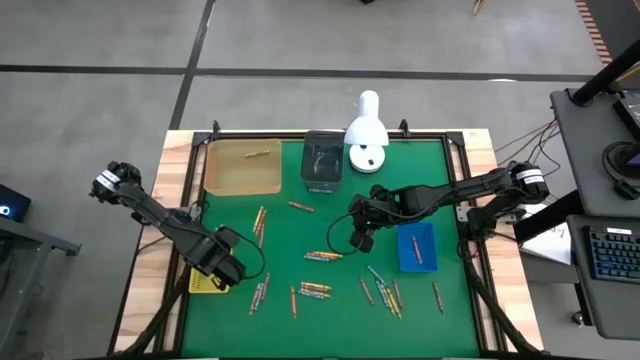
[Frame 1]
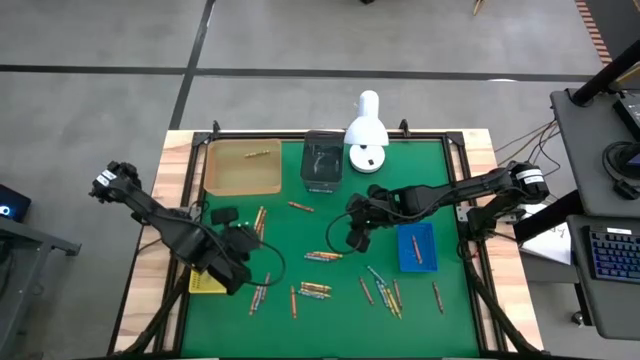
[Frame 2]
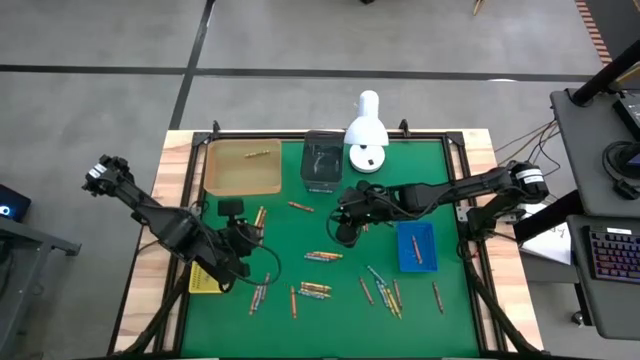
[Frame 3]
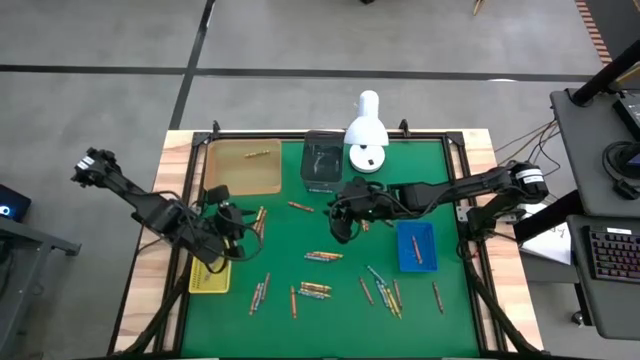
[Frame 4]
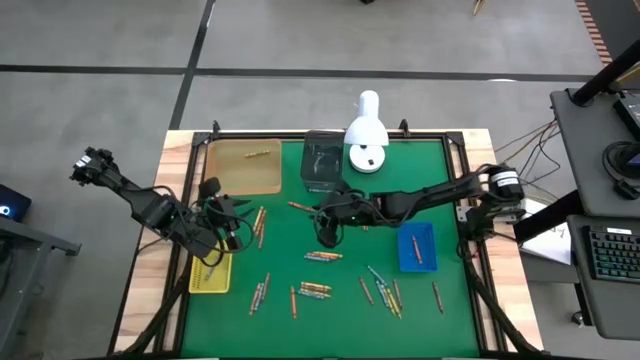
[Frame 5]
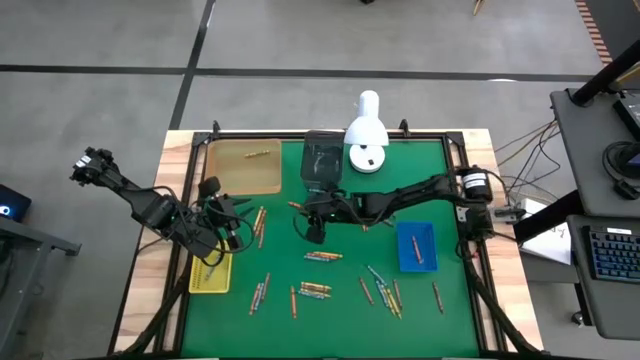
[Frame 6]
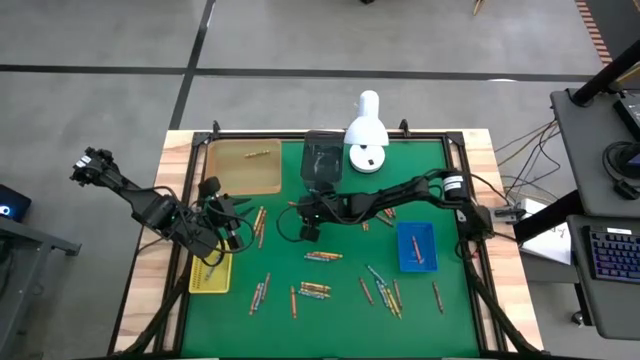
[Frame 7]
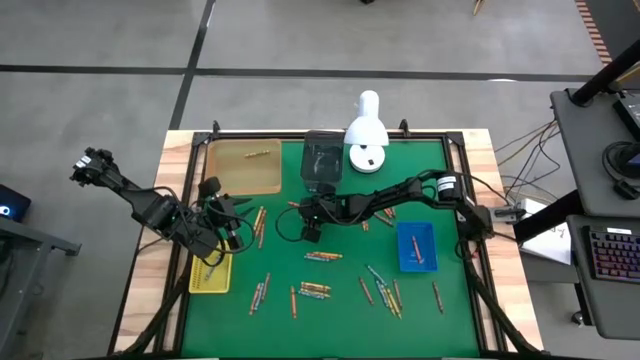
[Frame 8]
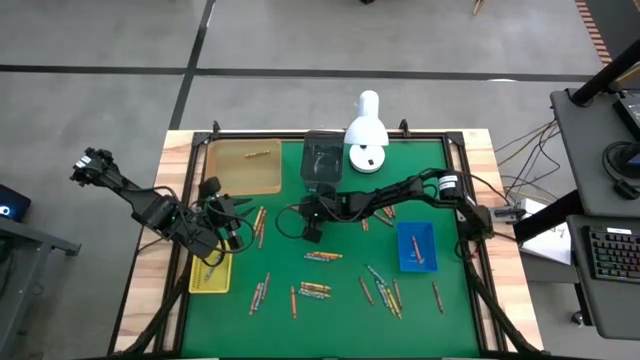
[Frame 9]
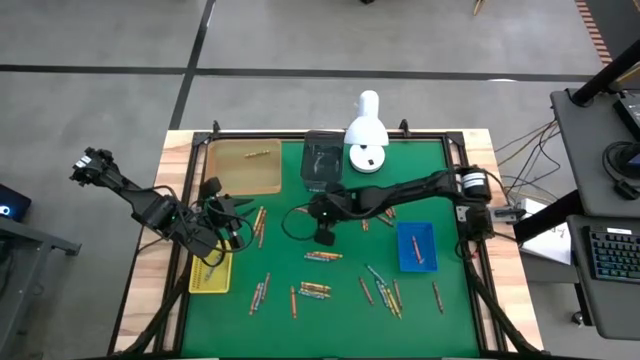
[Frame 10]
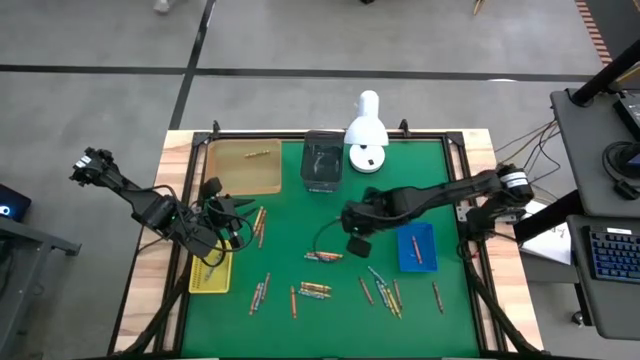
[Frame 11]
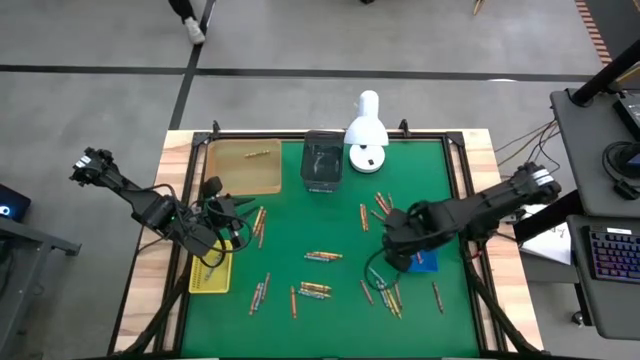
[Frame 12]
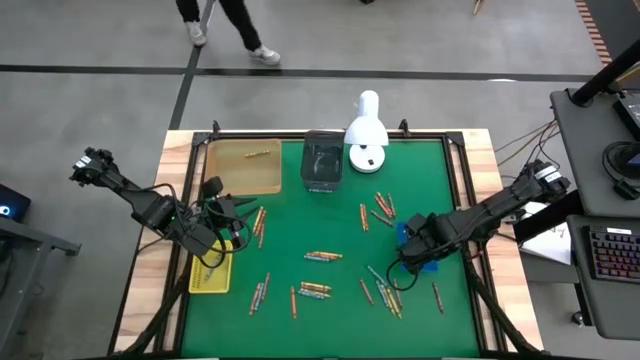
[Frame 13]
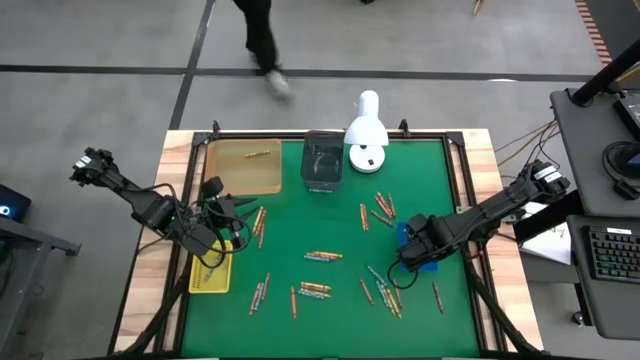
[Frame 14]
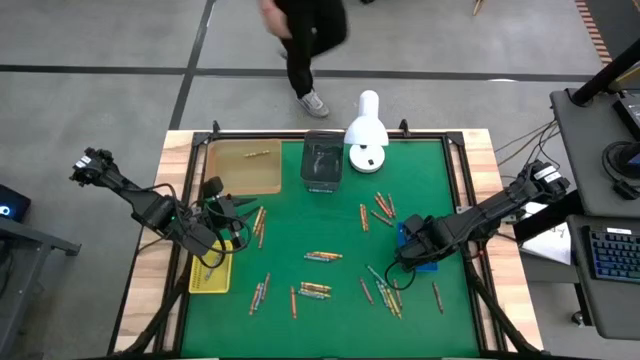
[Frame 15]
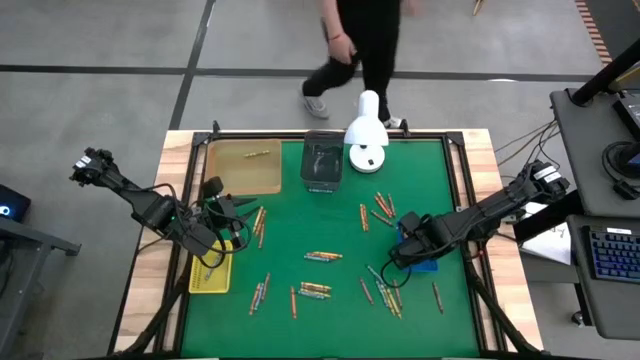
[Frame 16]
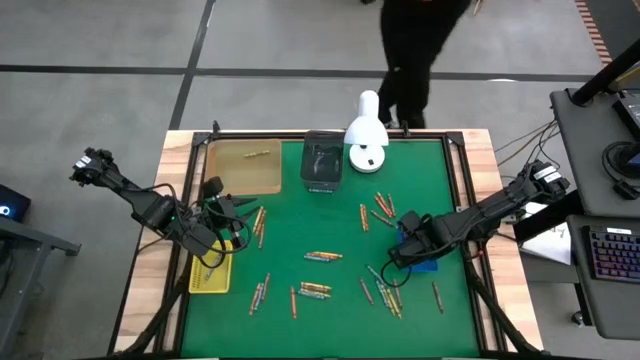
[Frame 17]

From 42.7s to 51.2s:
Task: Sort crayons
Put the orange crayon into the blue bin

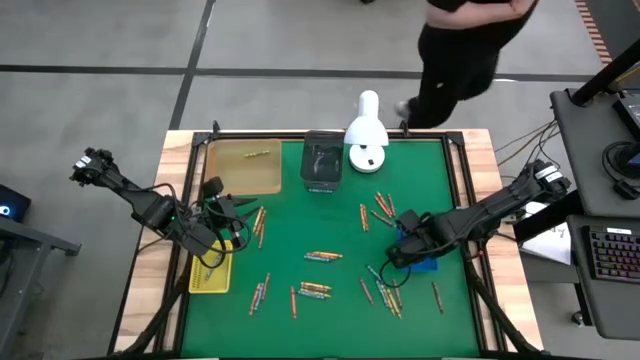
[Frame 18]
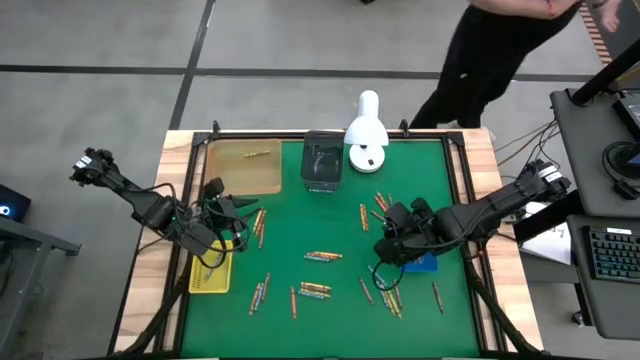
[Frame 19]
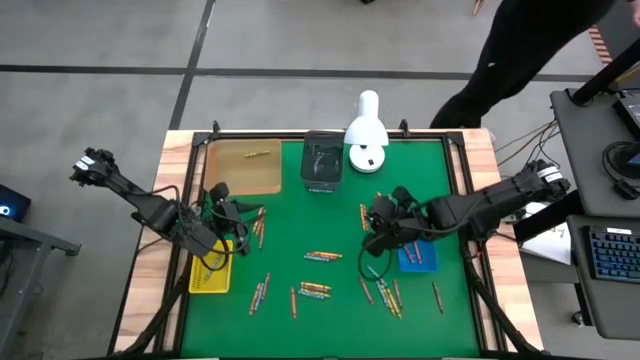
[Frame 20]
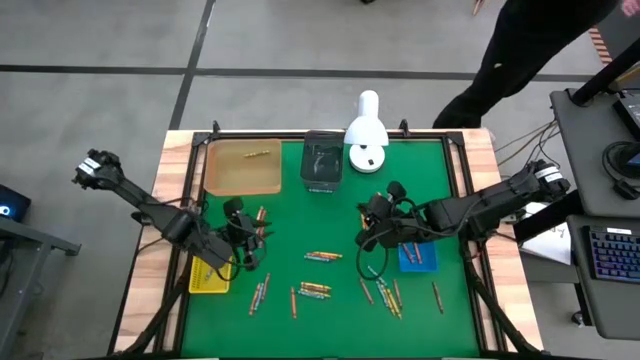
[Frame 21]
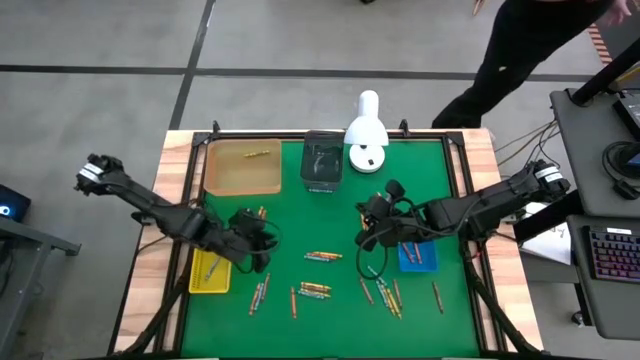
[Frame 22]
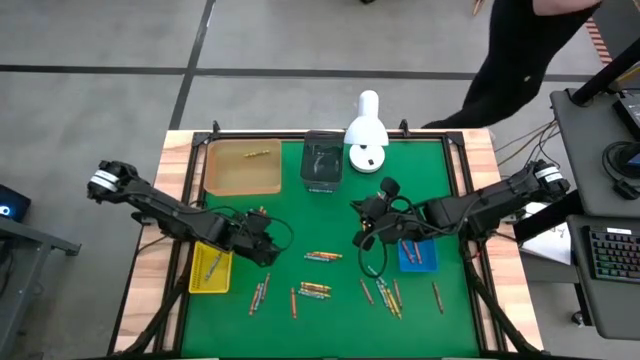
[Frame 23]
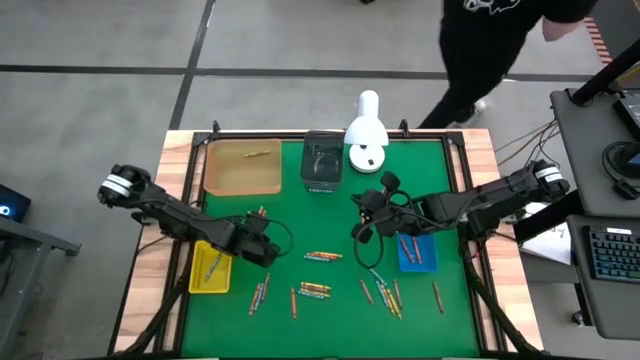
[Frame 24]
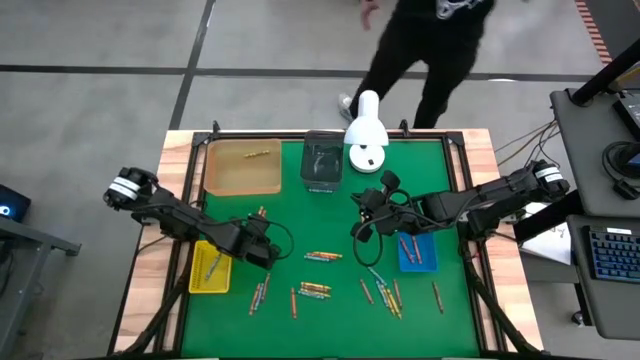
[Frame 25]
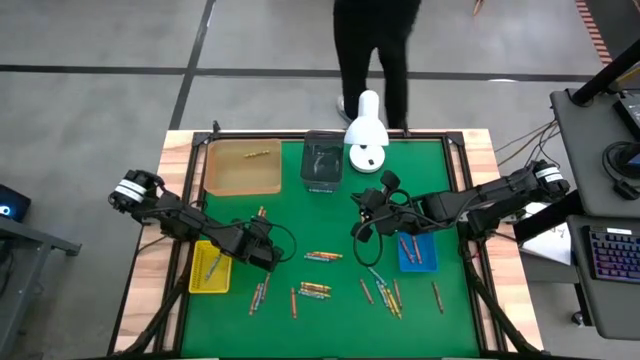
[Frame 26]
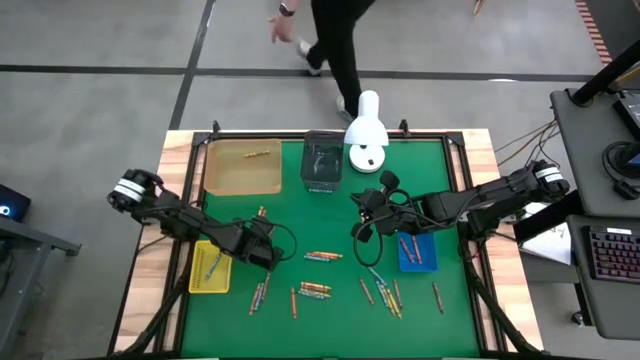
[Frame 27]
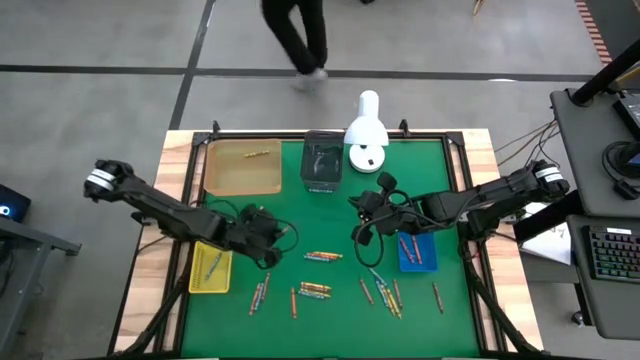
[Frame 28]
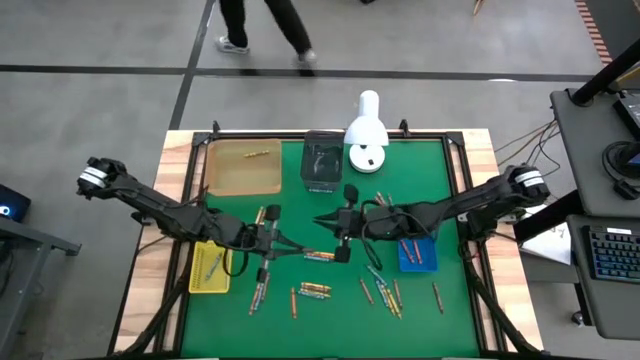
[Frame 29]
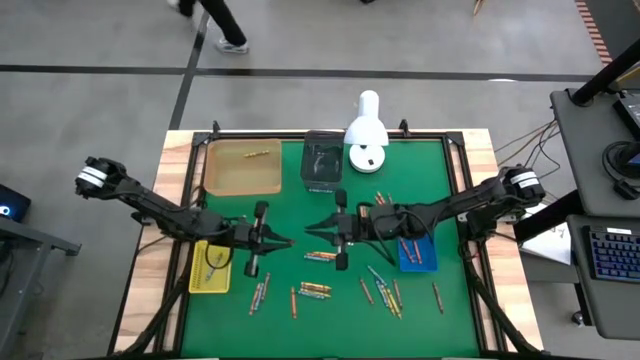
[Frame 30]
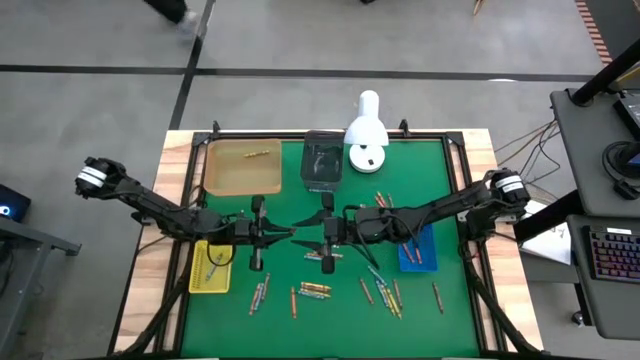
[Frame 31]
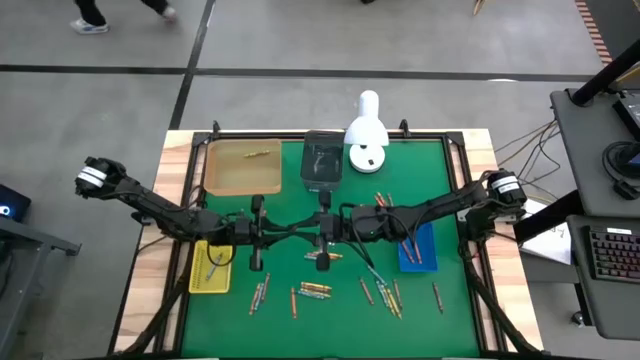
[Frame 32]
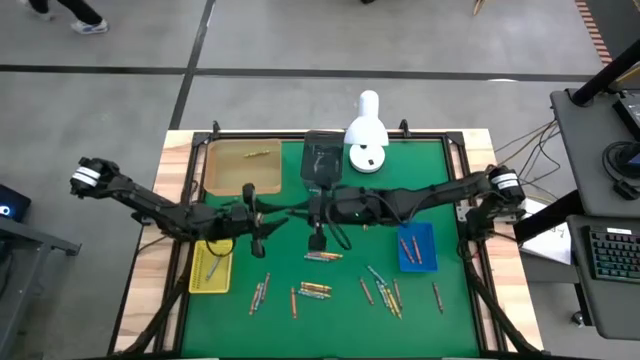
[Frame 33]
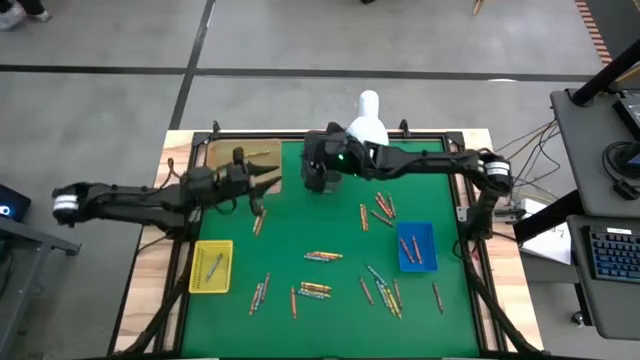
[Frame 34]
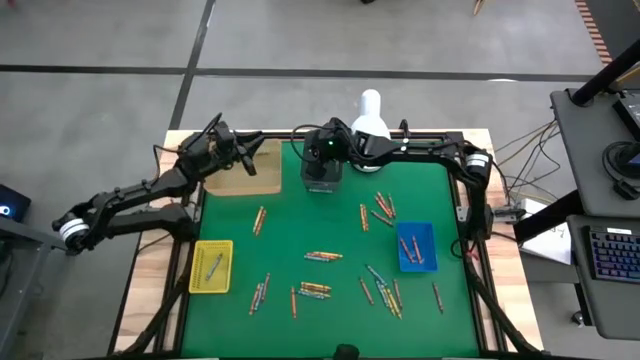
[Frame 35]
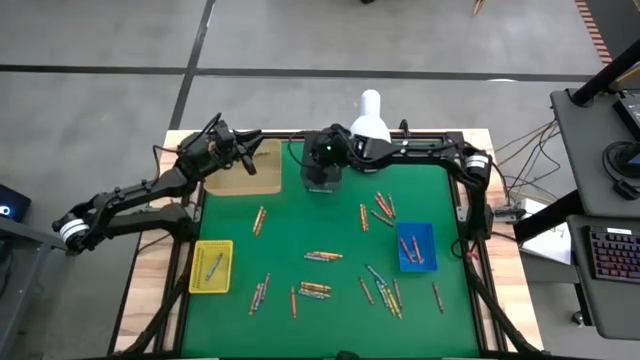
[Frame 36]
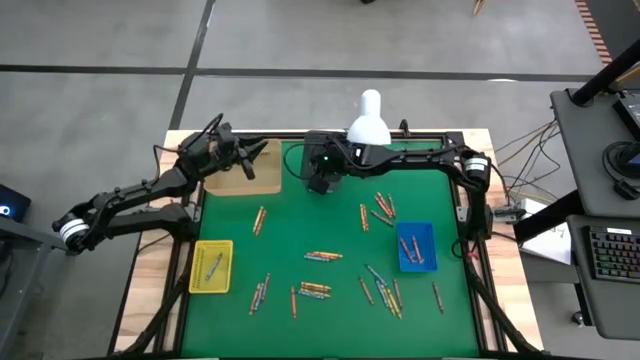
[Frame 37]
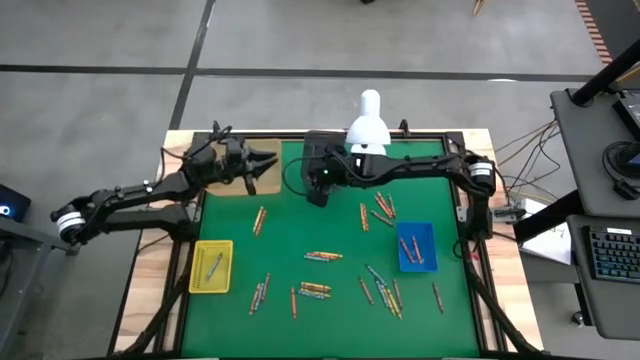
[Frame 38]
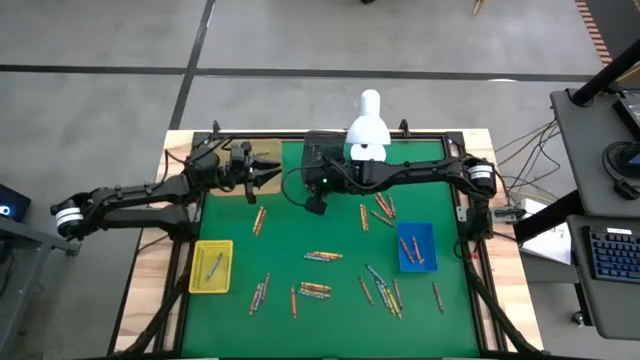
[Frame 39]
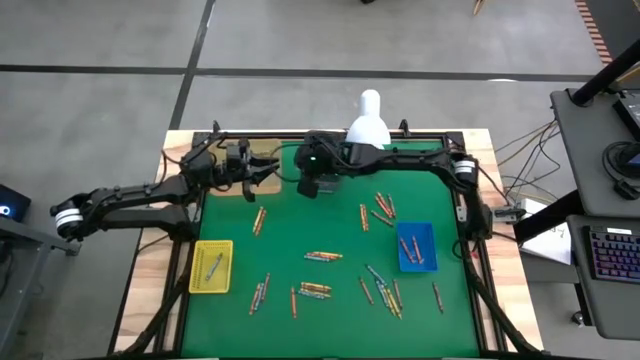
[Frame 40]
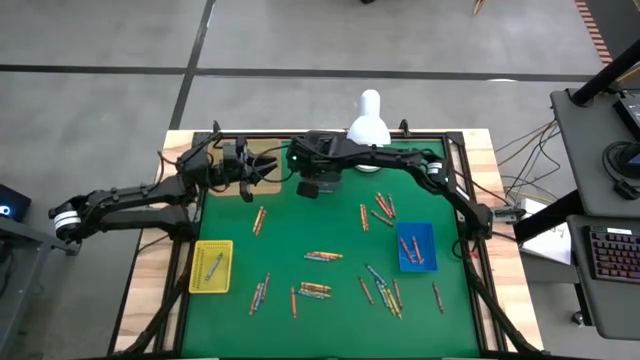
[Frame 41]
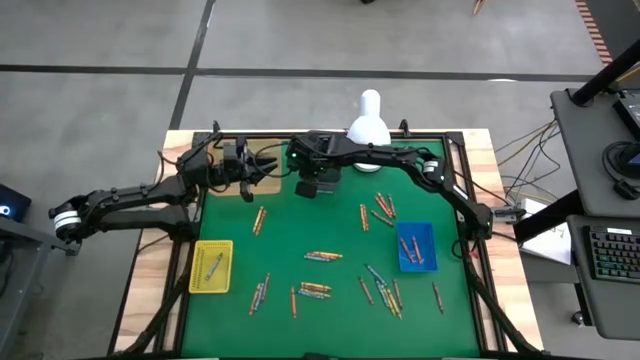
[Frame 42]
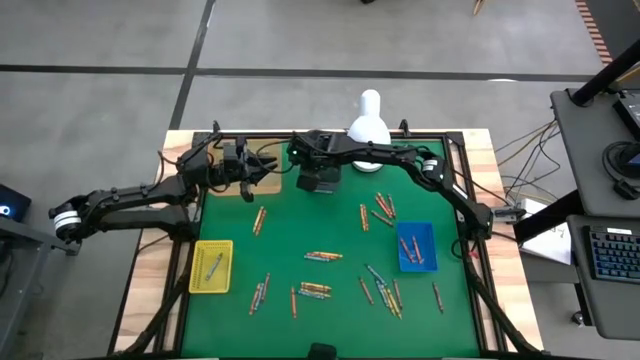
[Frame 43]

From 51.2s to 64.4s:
Put the brown crayon into the black bin
